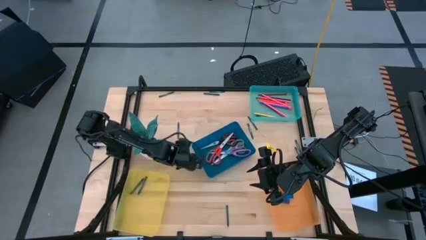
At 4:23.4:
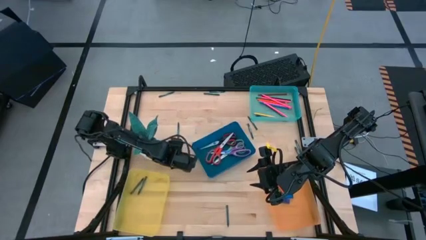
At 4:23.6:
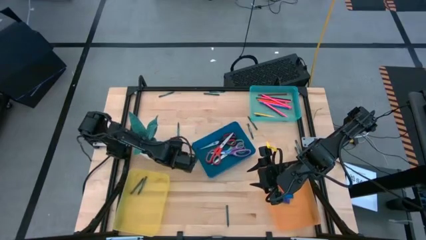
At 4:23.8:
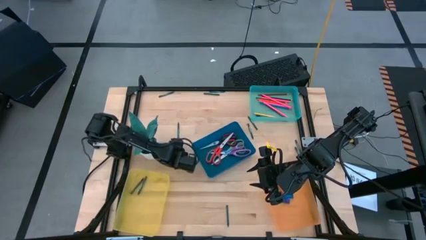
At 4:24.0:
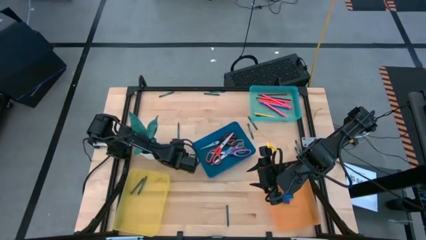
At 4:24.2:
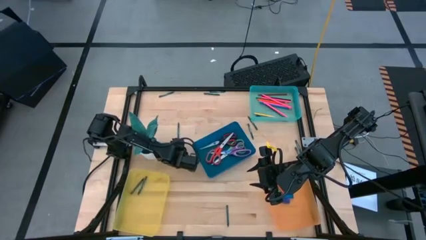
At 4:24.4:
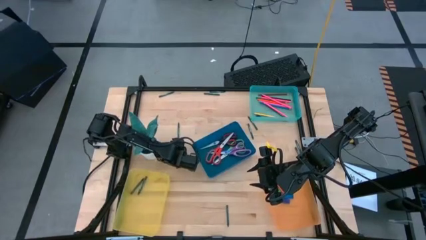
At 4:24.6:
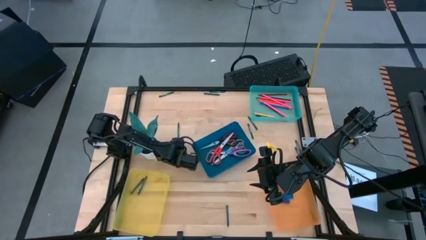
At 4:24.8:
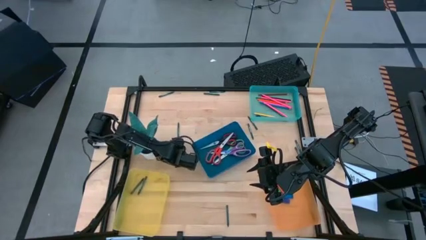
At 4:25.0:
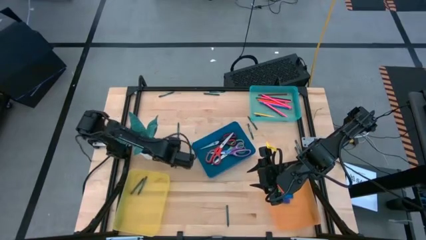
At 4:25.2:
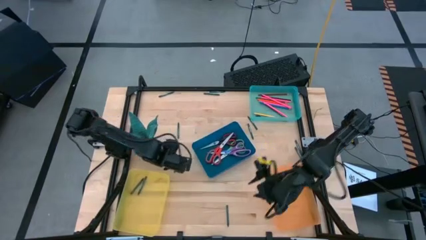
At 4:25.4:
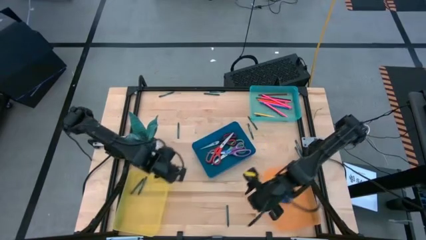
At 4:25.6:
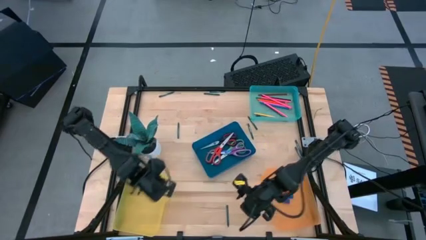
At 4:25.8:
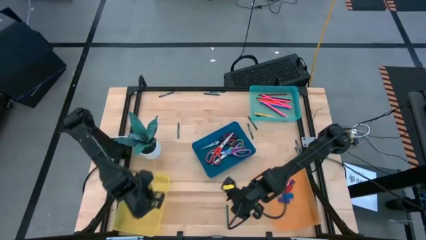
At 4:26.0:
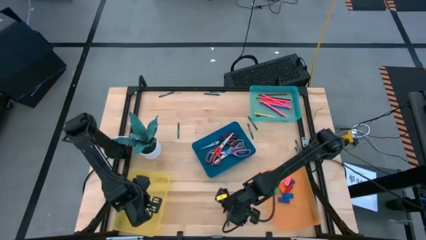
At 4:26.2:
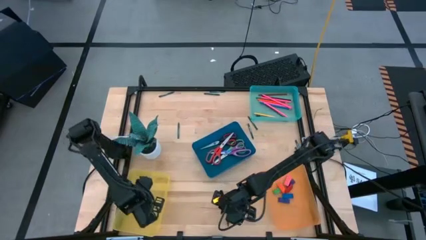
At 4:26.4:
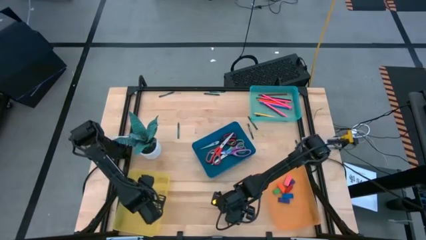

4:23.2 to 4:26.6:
Task: Sort crayons/erasers/pens/pencils in bins
Put the green crayon into the yellow bin

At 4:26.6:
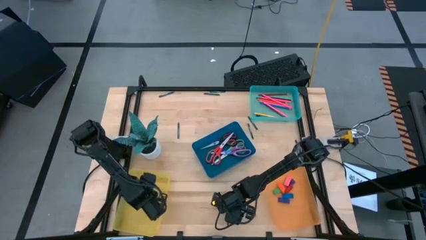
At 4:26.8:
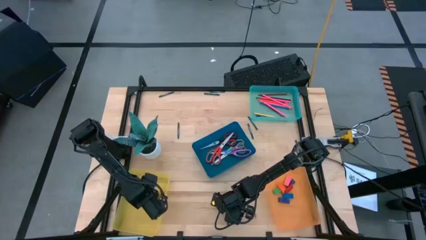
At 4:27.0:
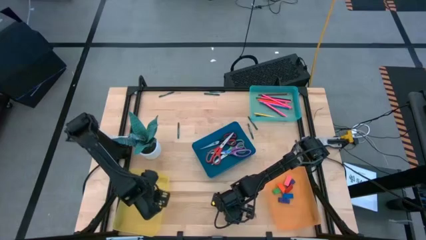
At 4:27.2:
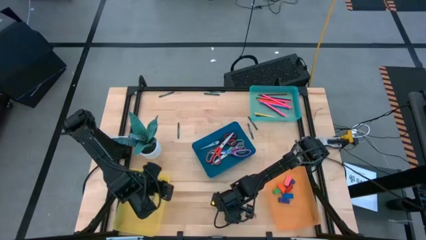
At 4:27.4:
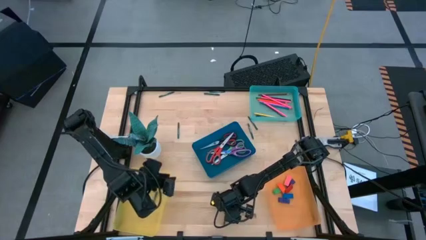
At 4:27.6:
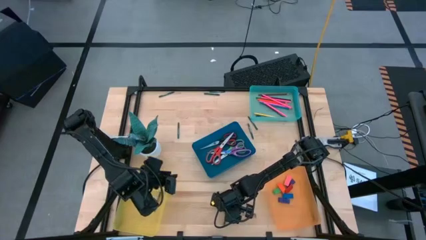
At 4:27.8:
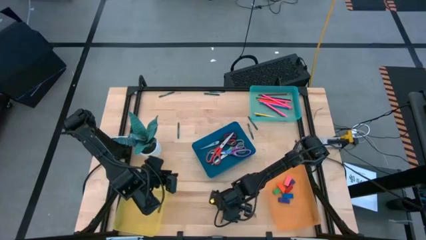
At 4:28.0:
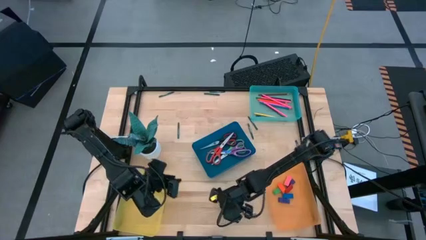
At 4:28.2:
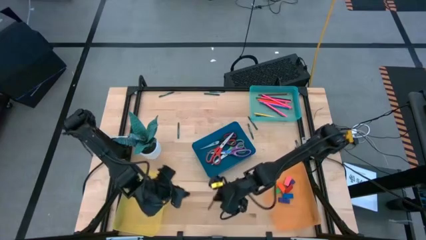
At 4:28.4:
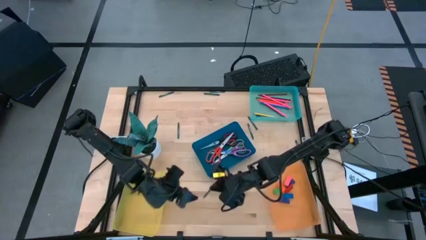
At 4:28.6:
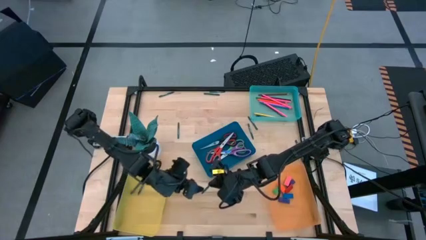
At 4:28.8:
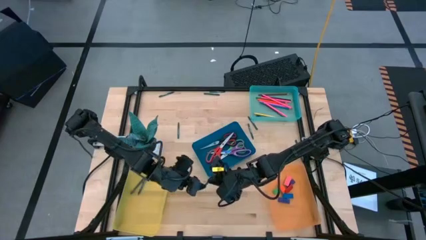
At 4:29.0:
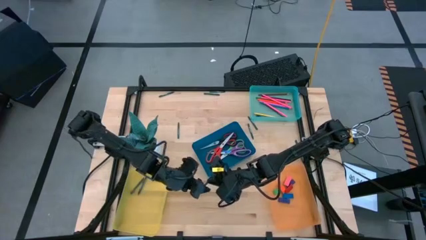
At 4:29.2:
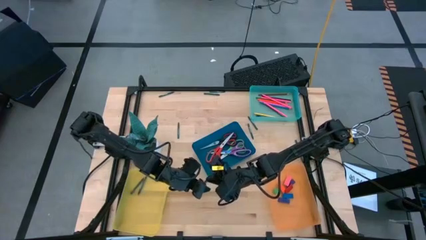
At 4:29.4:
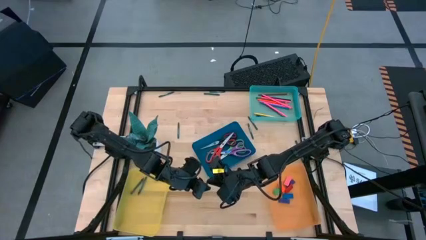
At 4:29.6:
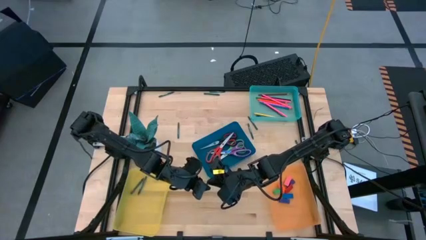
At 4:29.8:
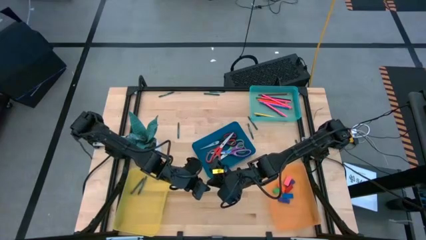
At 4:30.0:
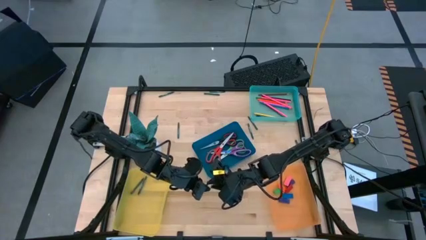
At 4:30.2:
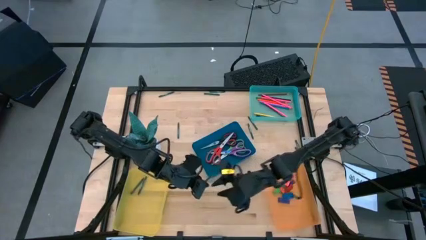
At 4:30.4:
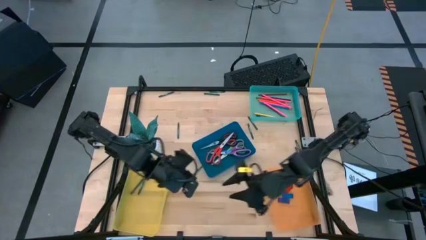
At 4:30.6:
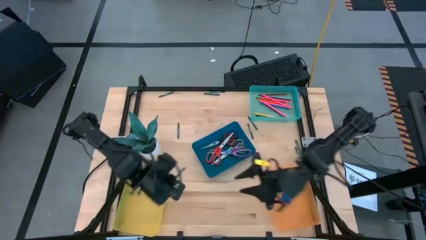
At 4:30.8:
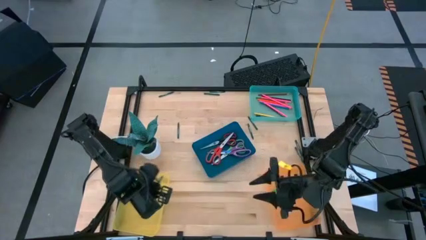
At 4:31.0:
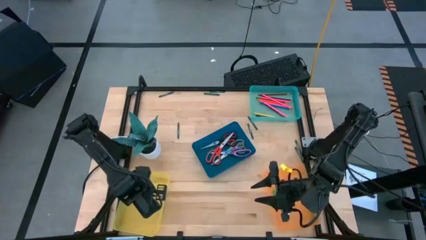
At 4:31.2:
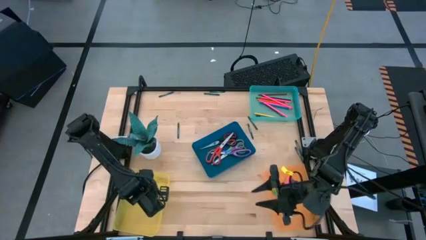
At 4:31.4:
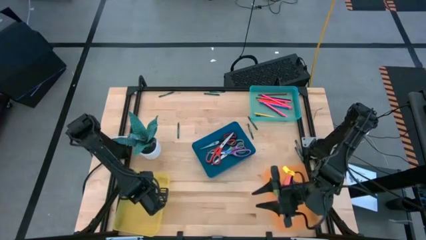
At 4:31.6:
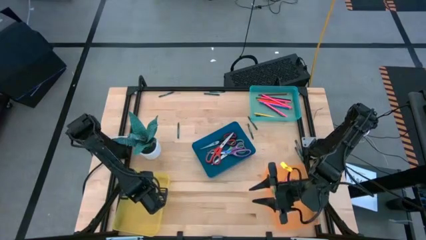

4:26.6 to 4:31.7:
Put the green crayon into the yellow bin

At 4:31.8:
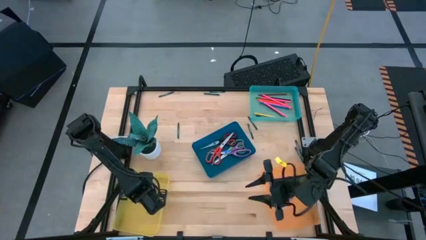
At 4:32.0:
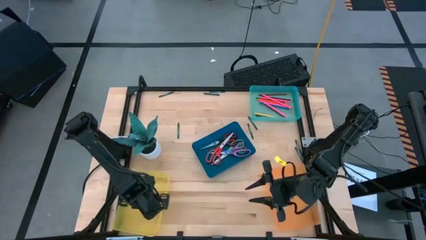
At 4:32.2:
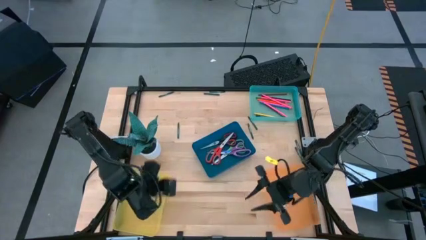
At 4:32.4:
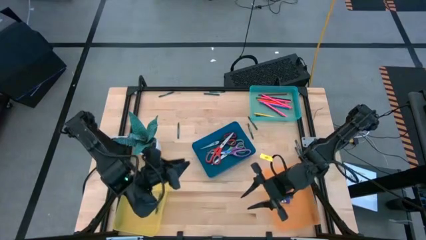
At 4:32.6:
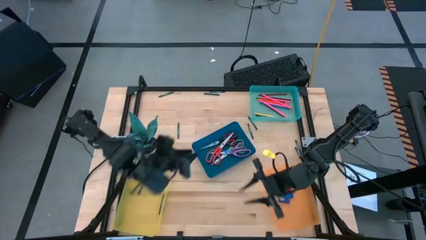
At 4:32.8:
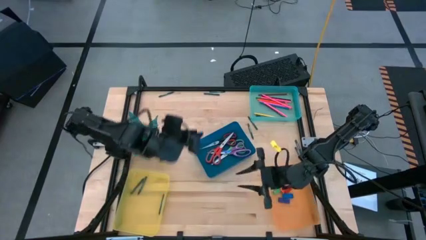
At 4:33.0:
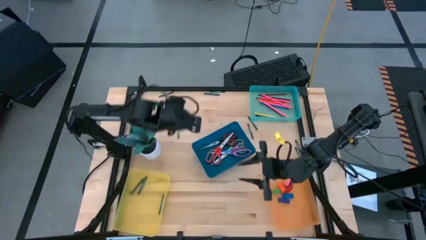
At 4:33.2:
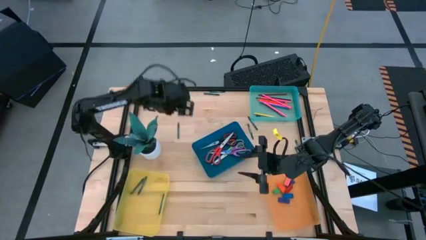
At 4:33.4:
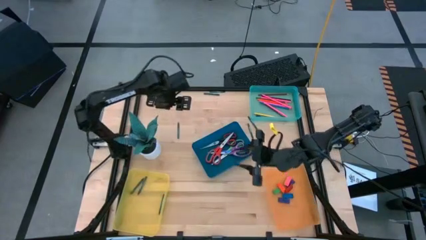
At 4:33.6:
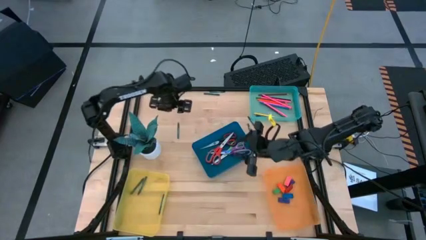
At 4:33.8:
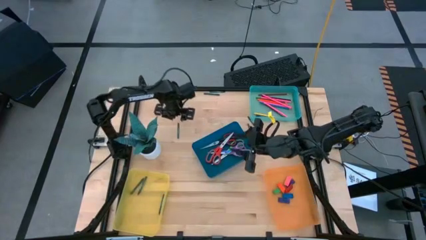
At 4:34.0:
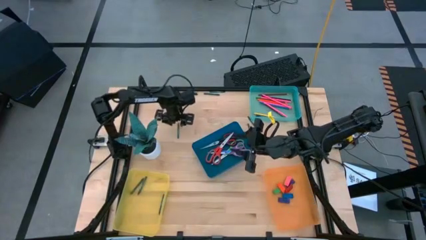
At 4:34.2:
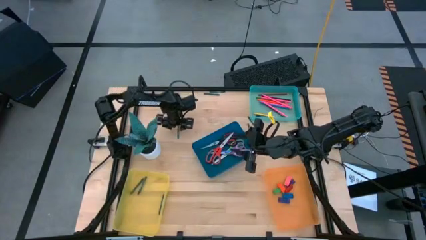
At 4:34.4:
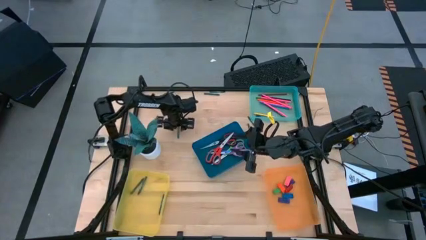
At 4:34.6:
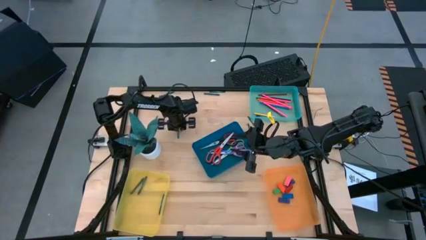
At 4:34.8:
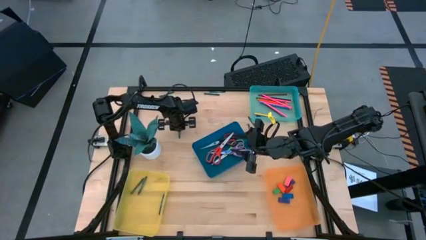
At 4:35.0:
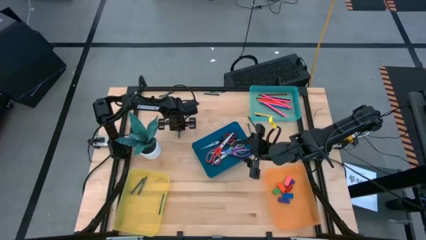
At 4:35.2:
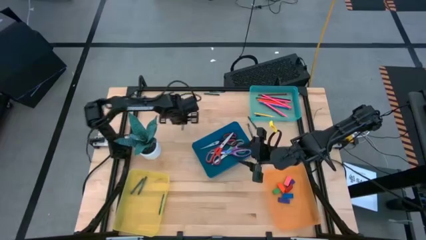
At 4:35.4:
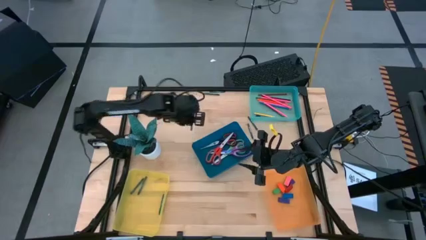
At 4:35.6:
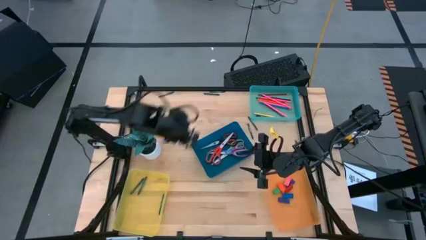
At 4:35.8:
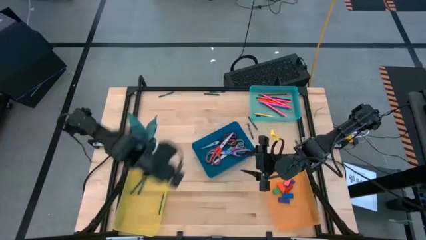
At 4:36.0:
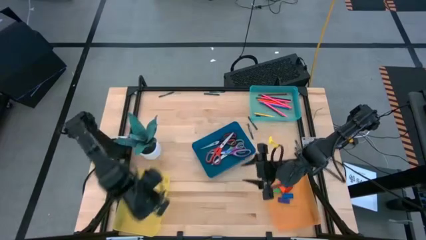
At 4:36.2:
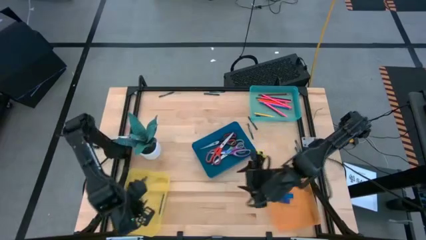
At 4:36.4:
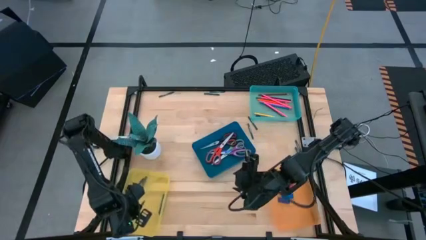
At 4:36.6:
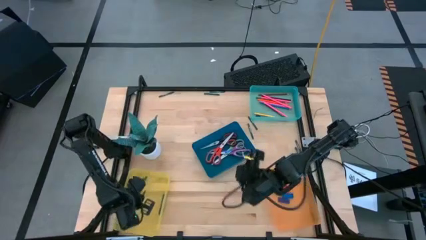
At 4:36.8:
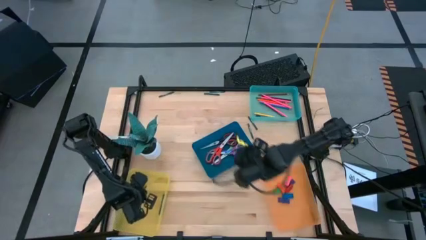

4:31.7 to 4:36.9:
Put the green crayon into the yellow bin

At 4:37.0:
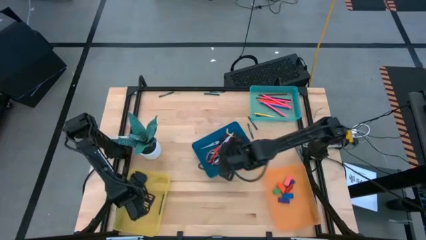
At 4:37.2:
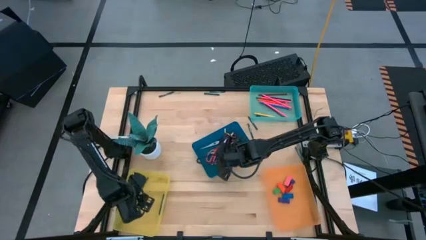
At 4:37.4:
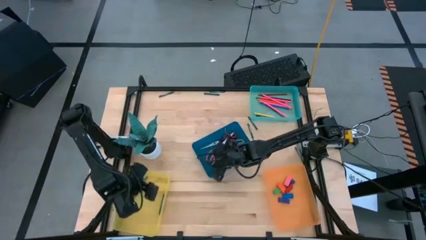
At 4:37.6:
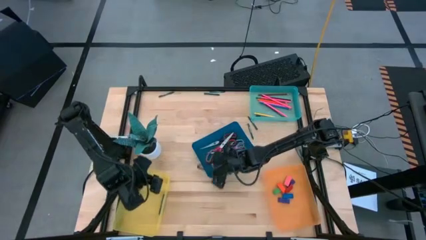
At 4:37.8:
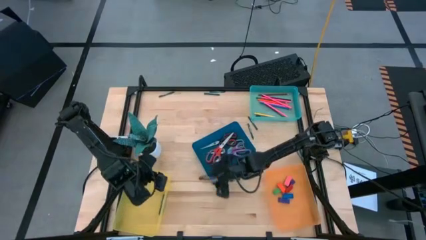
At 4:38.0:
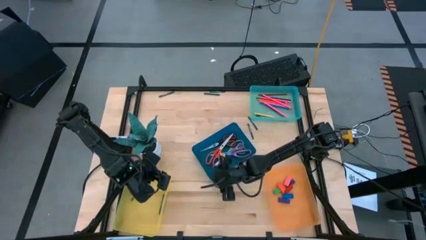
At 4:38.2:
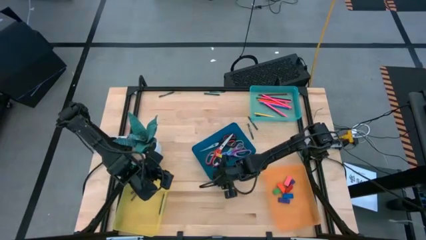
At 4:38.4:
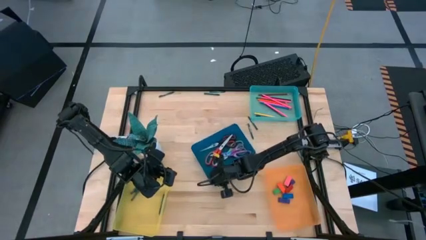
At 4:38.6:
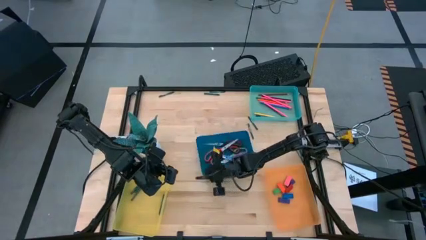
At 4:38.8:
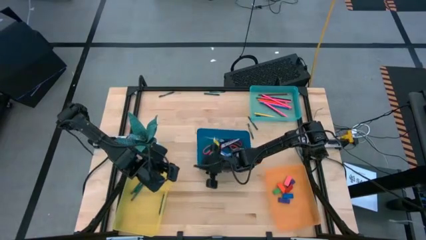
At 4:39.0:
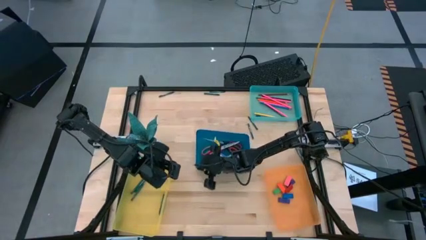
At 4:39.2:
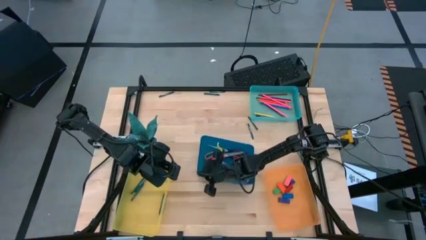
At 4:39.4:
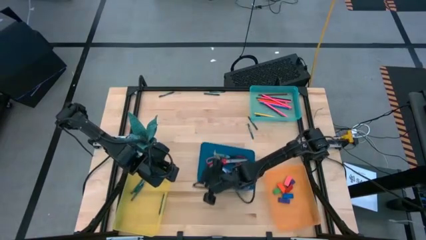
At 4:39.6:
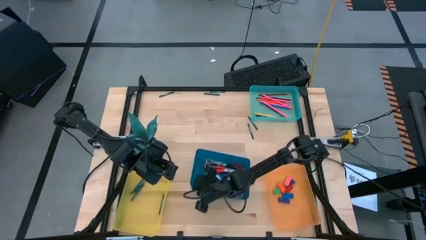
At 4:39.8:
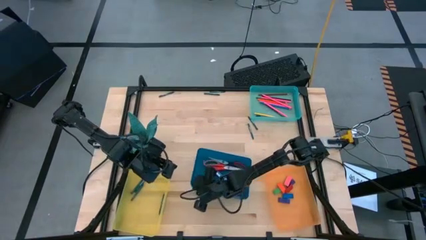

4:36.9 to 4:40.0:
Adjust the blue bin
